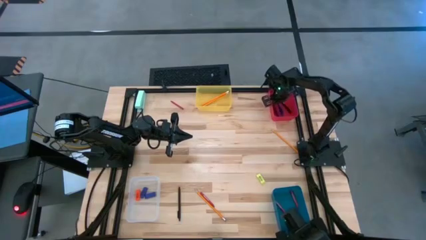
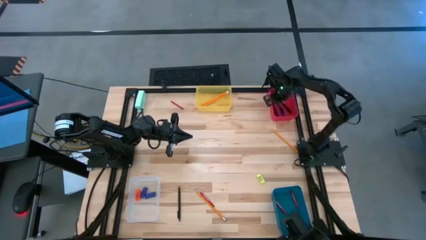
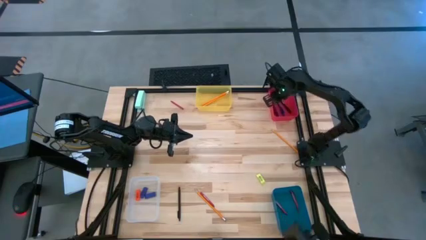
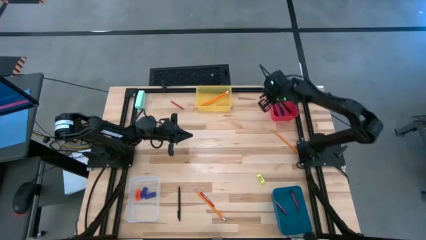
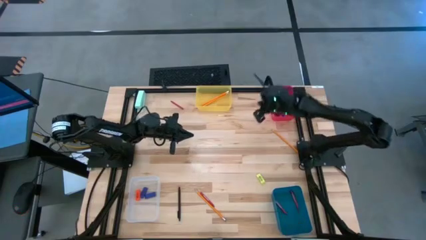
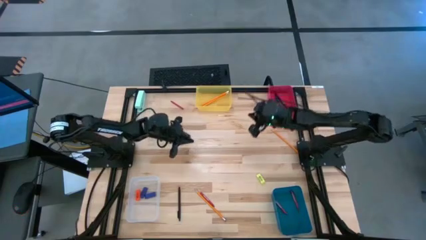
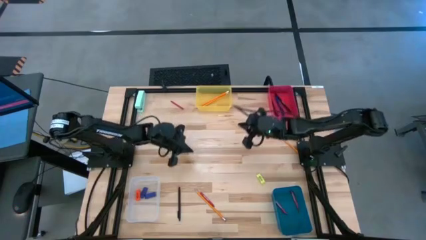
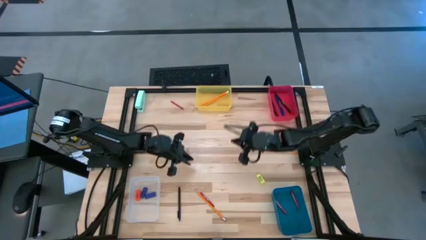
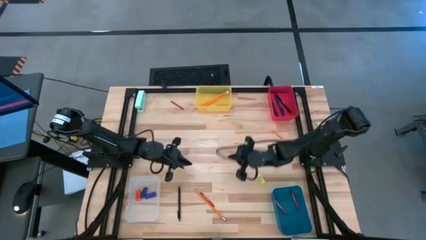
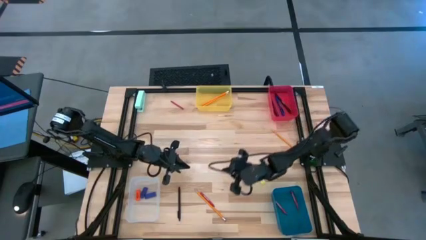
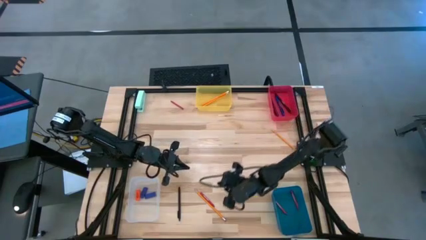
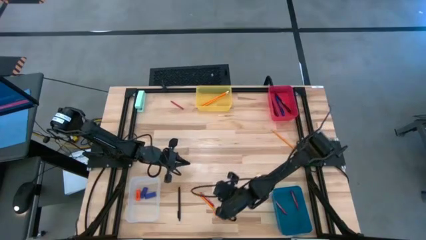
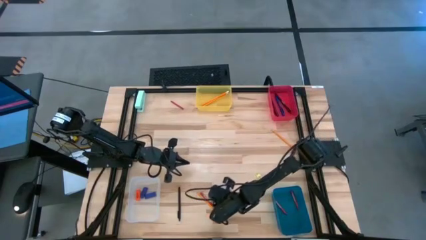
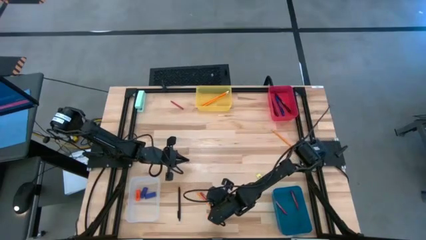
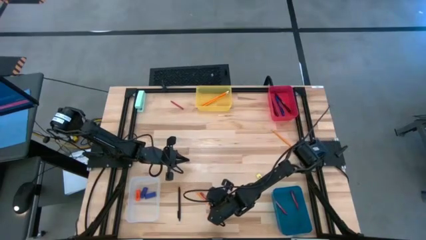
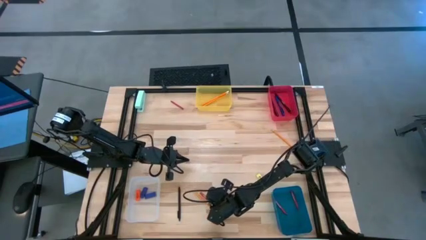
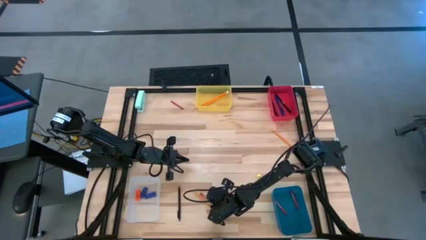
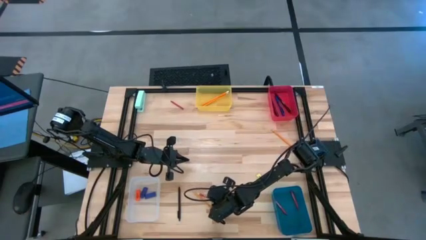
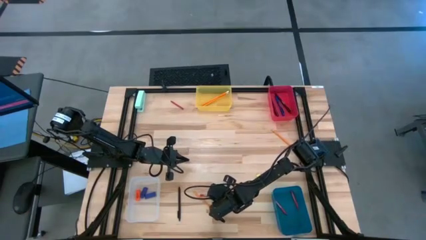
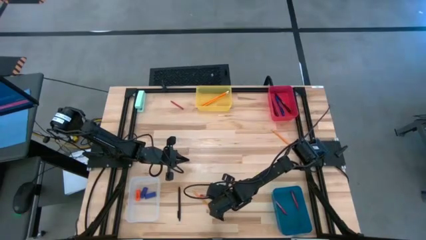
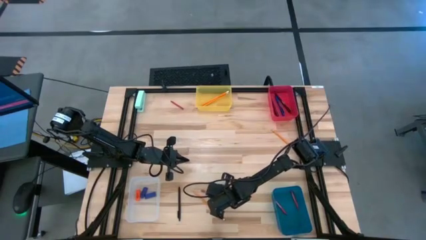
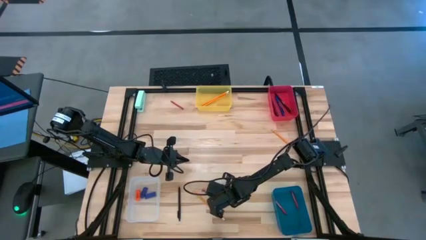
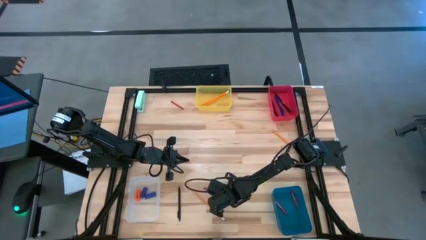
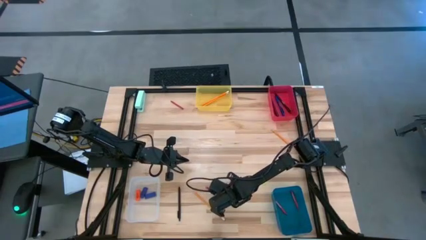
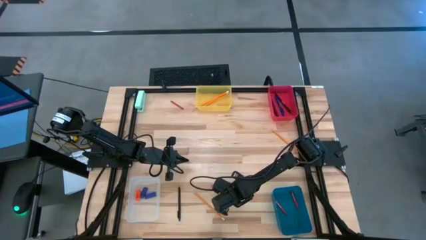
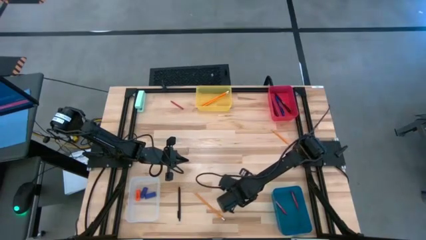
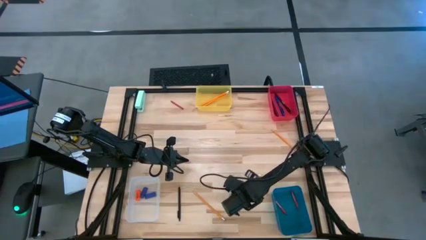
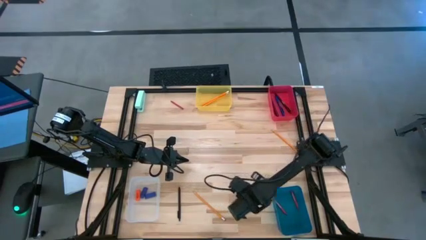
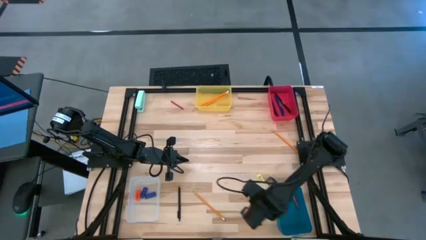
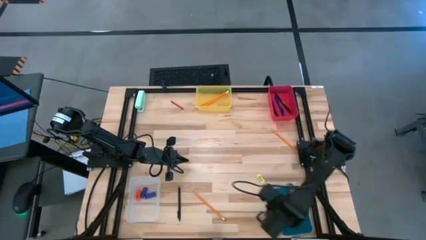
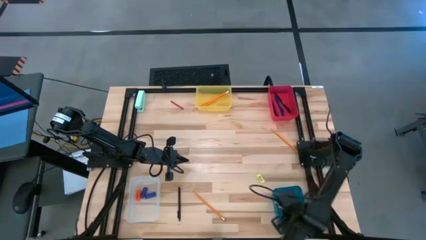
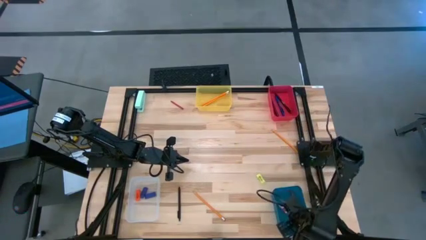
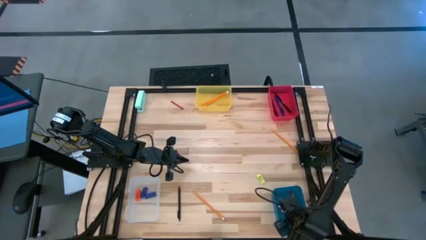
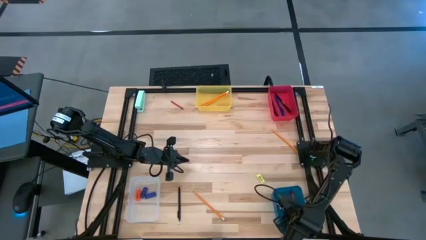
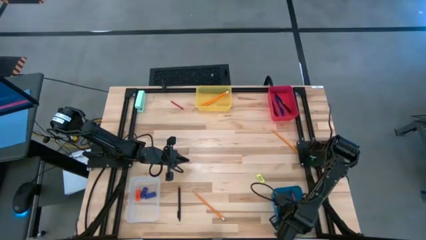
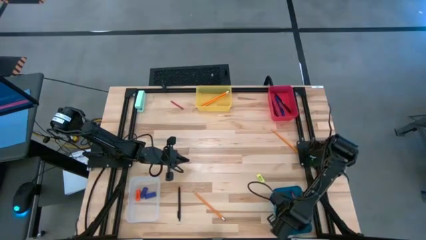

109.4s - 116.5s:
Task: Sort crayons/erasers/pens/pencils in bins
Put the red crayon into the blue bin

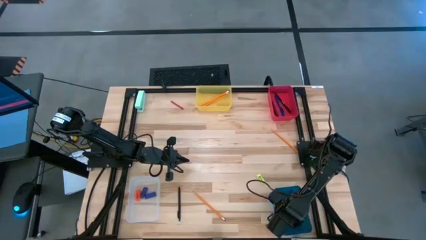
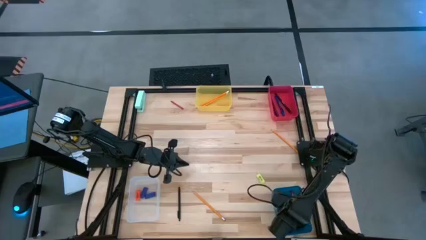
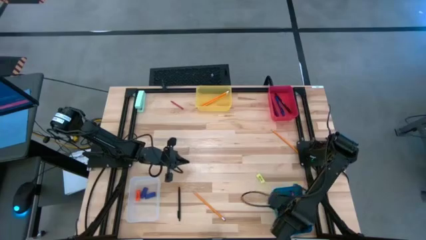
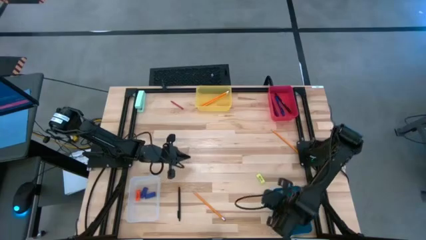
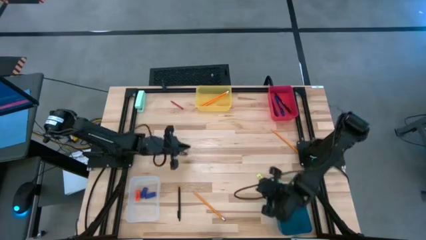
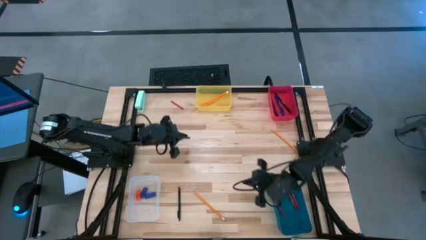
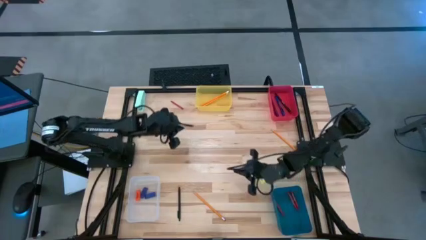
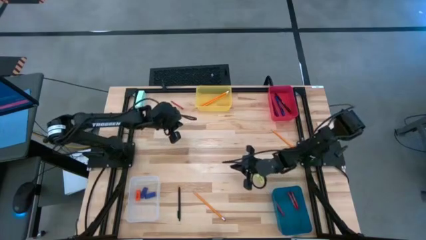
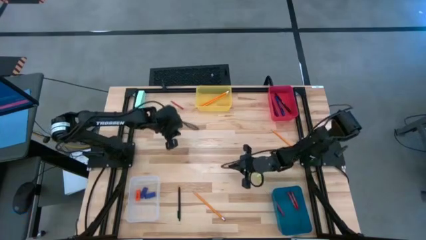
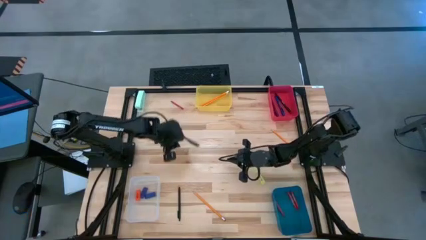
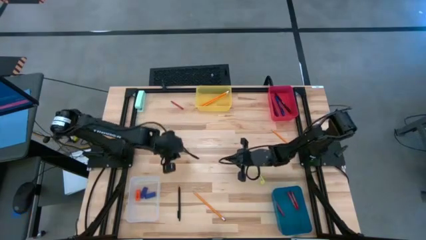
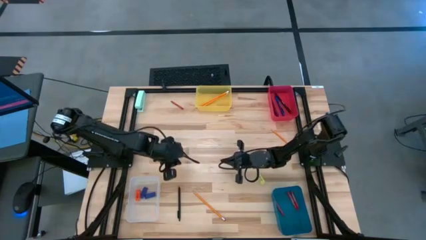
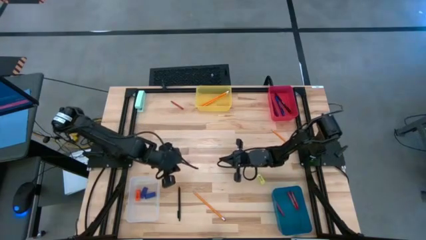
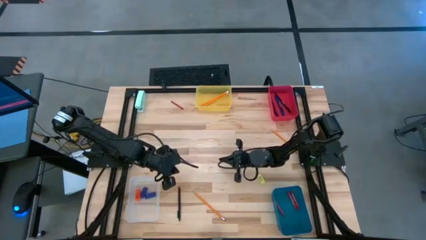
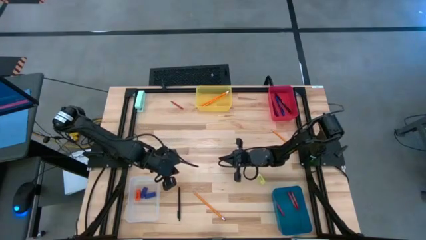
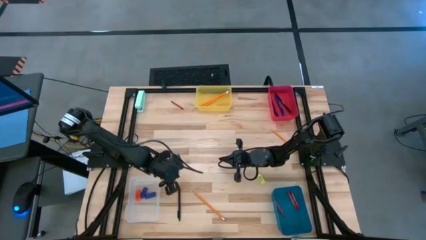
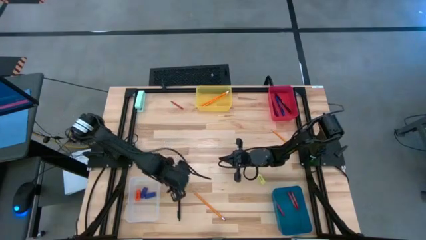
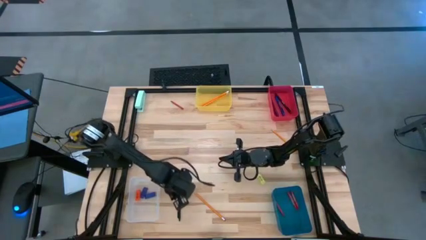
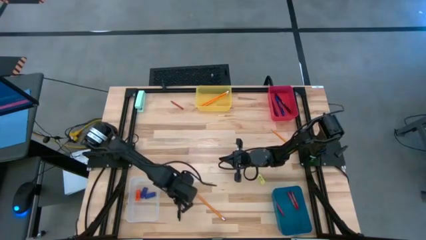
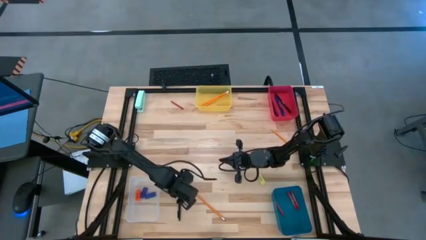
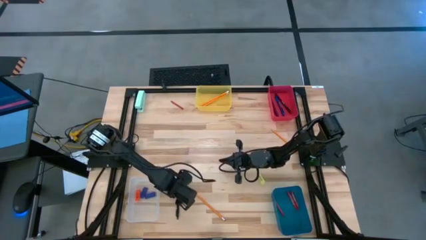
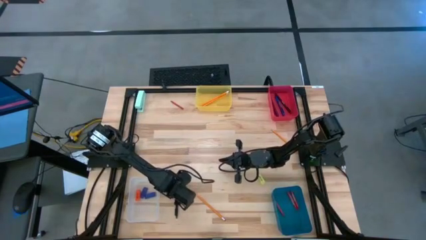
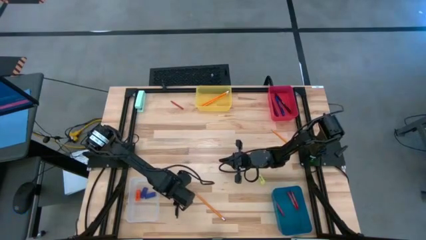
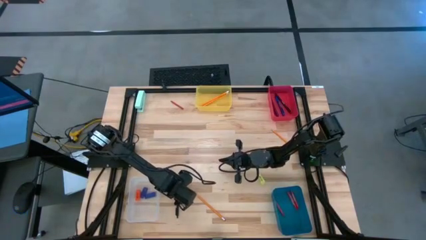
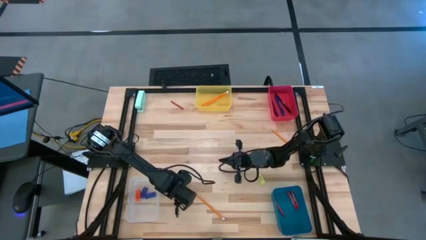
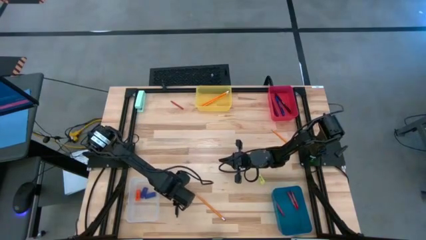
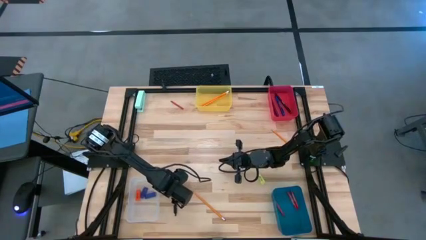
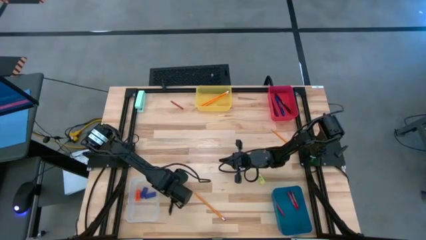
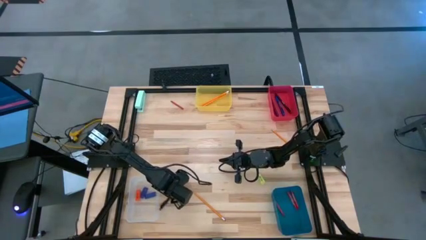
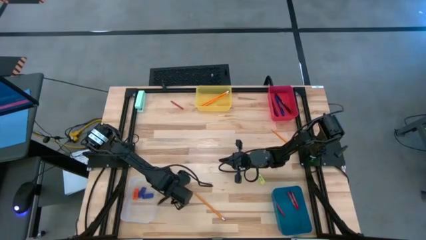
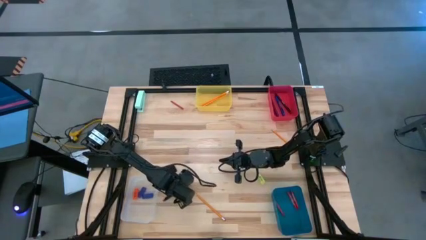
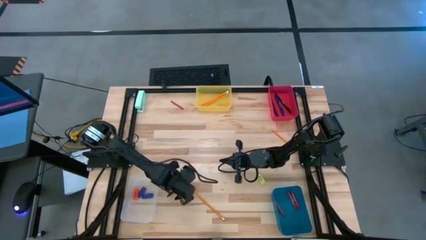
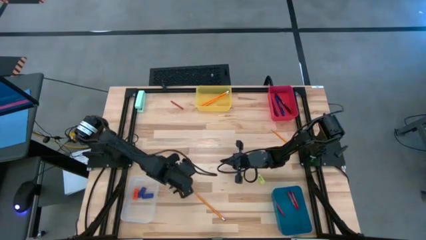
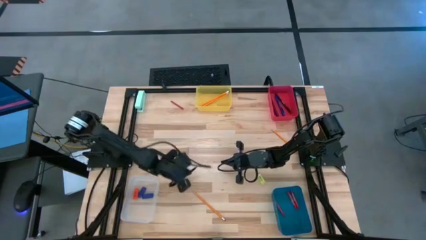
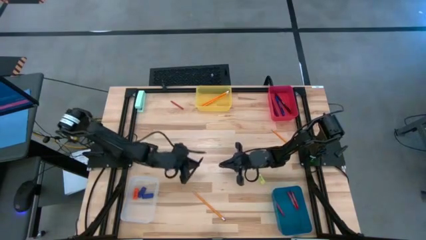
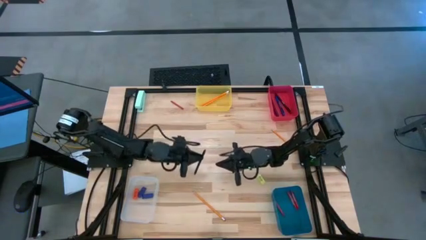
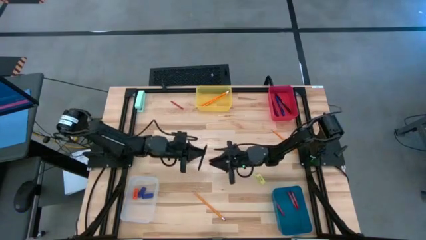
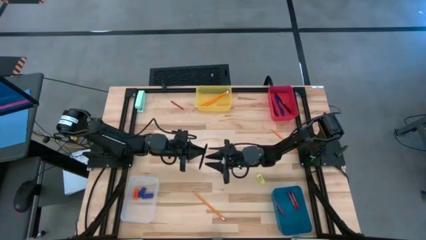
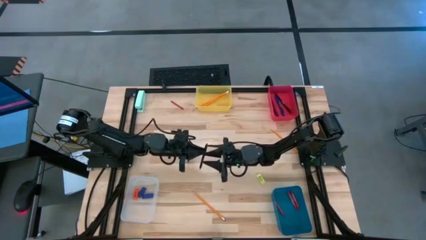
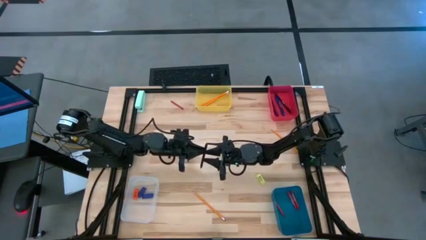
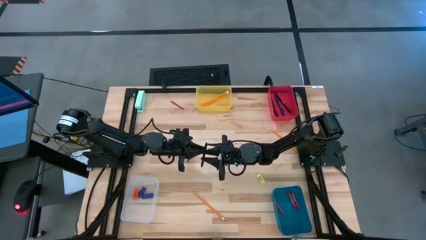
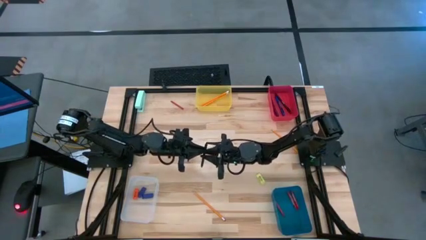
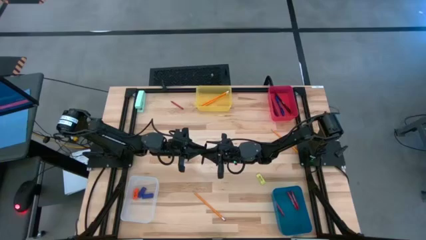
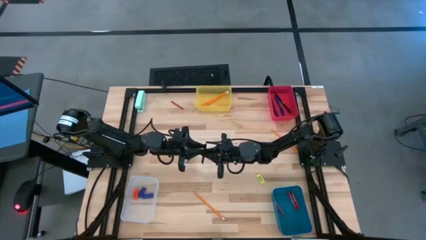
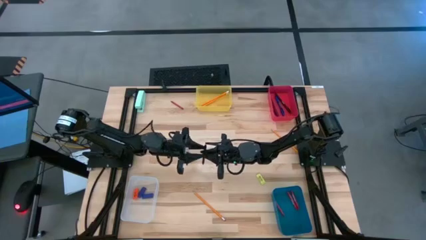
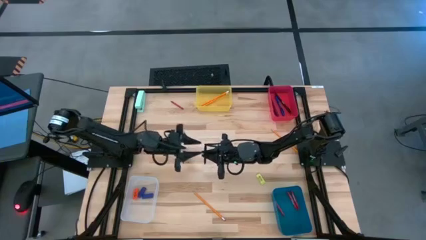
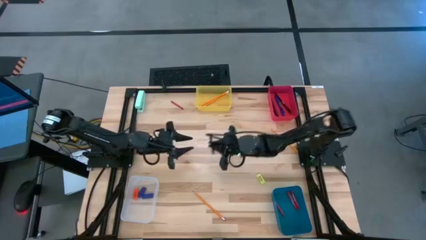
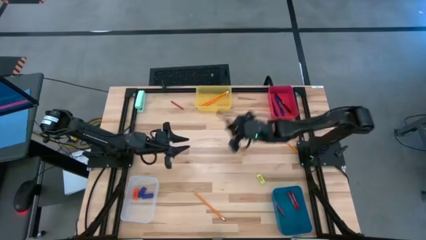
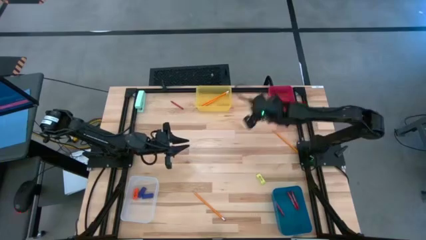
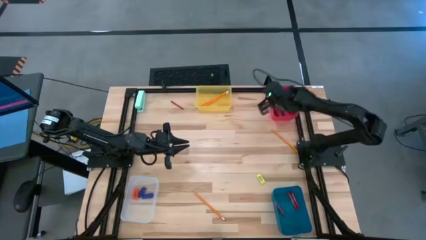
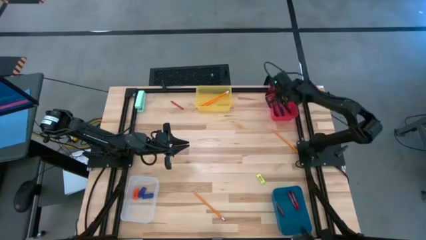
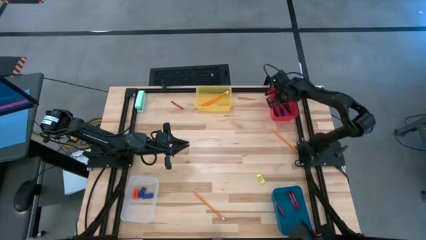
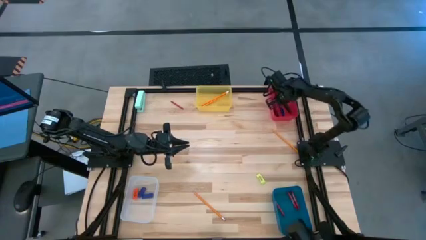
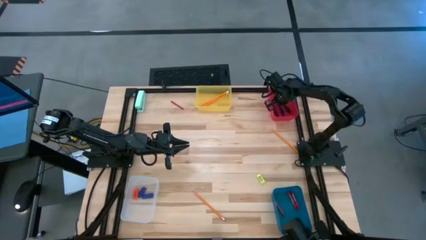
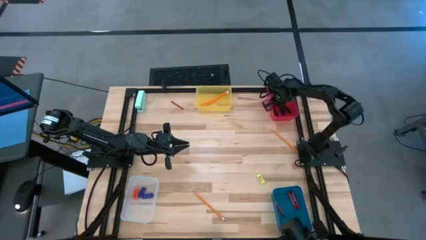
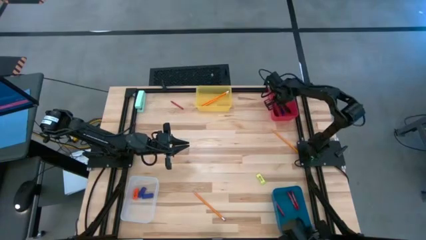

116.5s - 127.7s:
Put the black pen into the red bin
